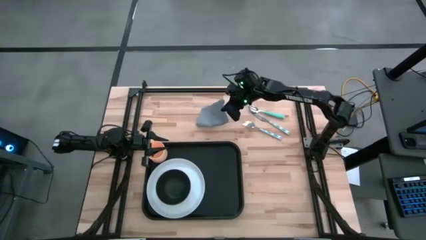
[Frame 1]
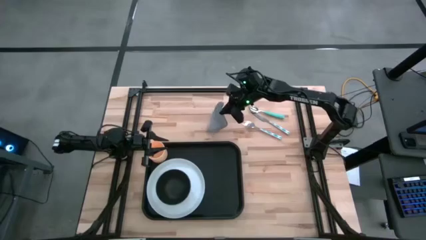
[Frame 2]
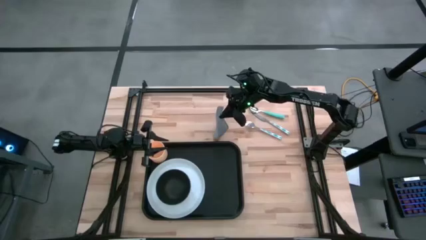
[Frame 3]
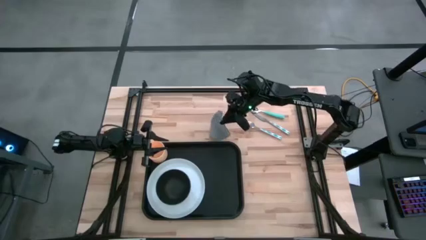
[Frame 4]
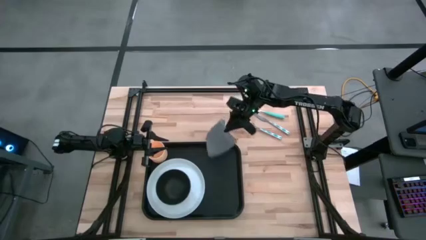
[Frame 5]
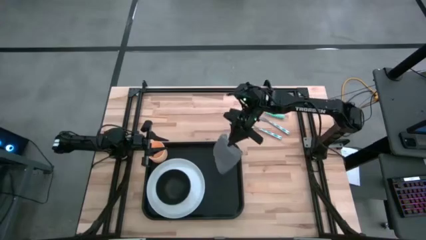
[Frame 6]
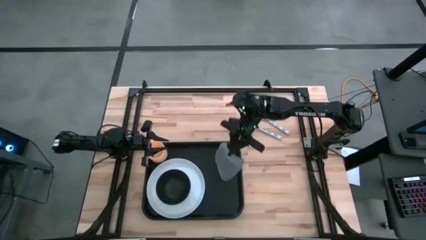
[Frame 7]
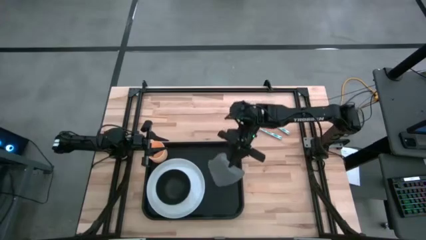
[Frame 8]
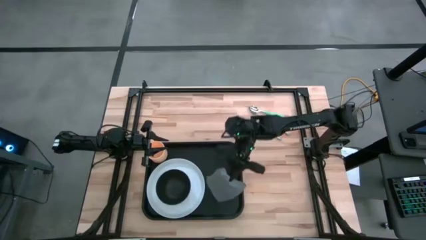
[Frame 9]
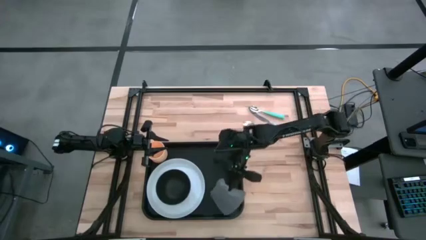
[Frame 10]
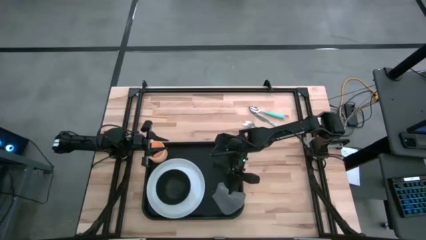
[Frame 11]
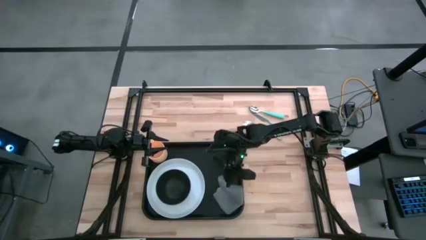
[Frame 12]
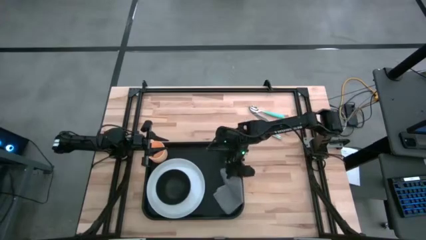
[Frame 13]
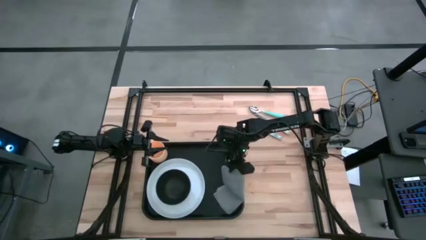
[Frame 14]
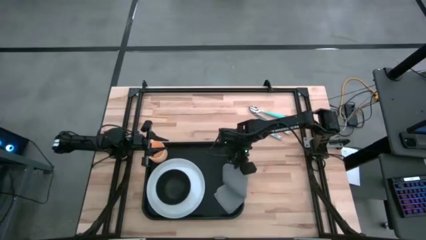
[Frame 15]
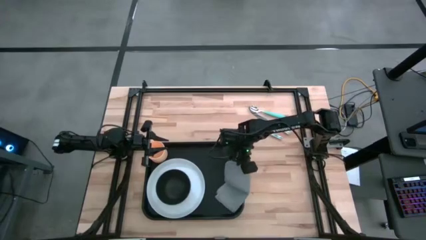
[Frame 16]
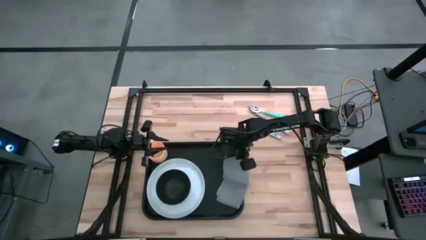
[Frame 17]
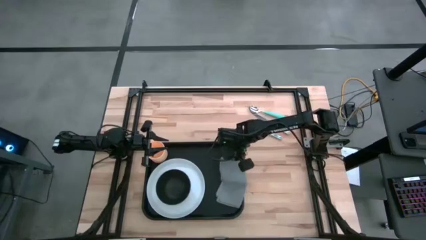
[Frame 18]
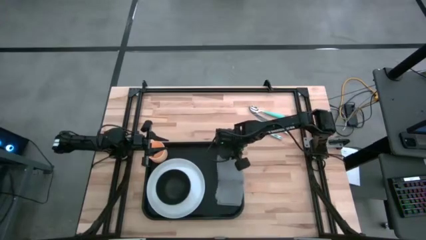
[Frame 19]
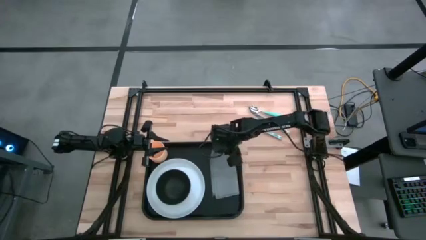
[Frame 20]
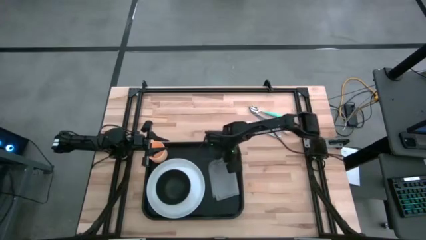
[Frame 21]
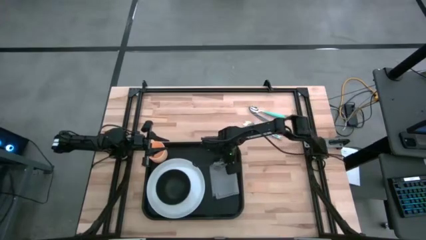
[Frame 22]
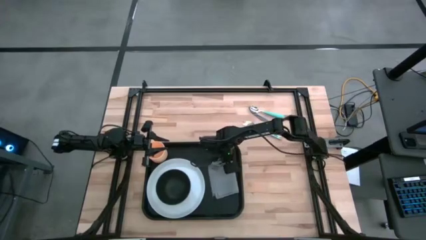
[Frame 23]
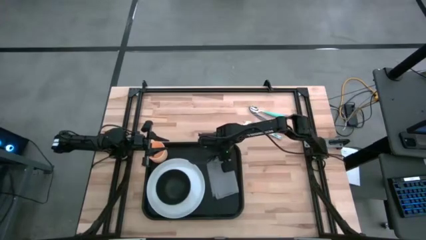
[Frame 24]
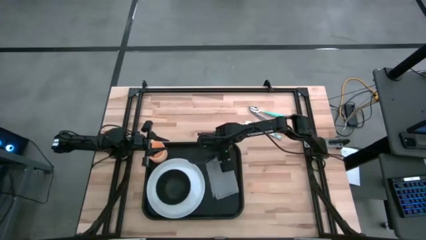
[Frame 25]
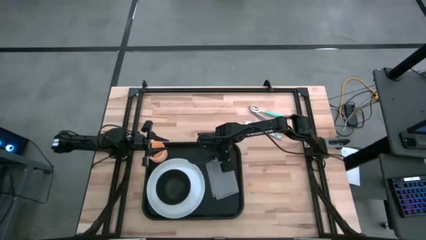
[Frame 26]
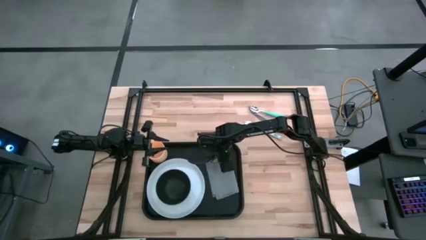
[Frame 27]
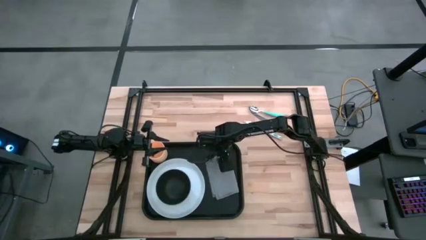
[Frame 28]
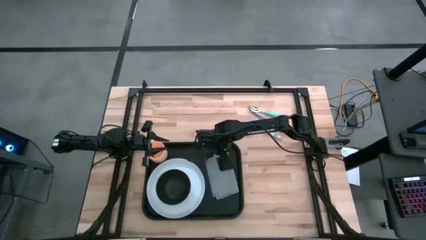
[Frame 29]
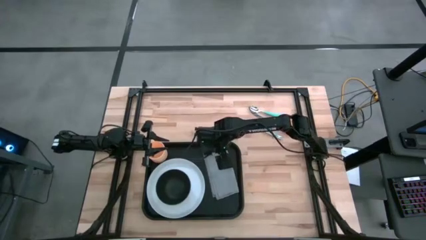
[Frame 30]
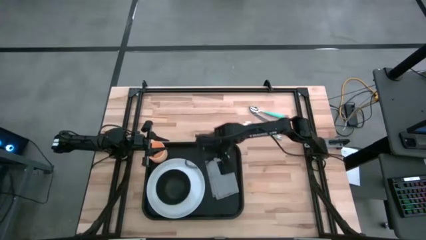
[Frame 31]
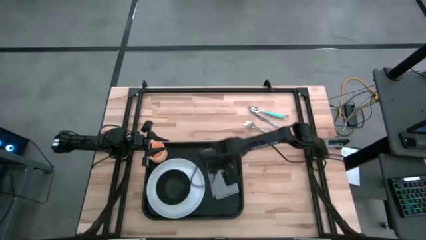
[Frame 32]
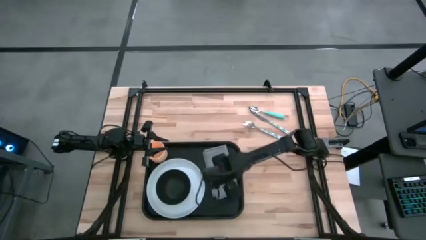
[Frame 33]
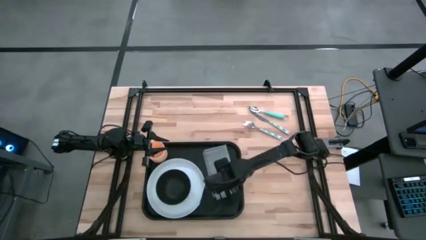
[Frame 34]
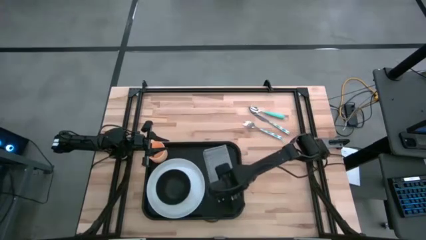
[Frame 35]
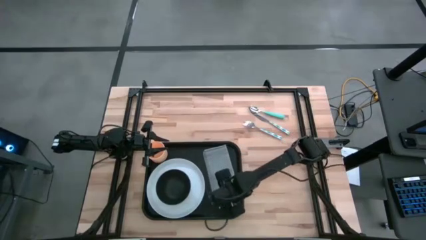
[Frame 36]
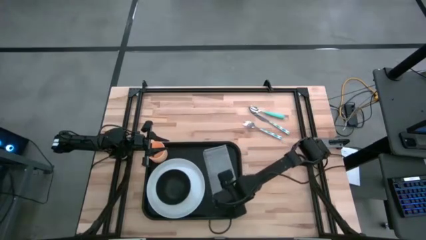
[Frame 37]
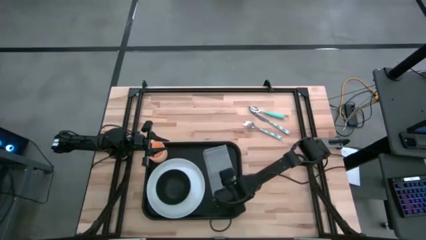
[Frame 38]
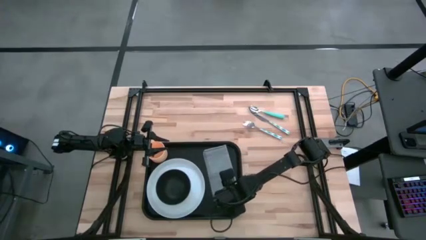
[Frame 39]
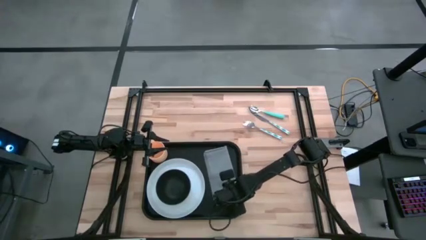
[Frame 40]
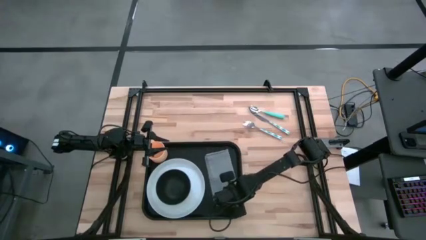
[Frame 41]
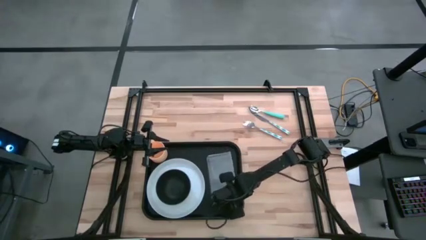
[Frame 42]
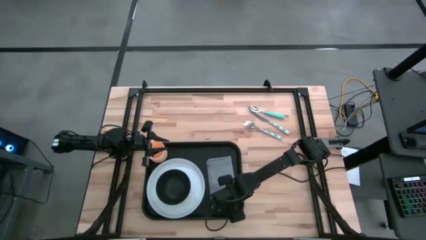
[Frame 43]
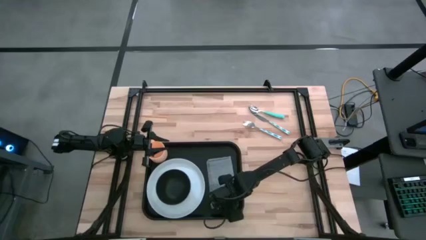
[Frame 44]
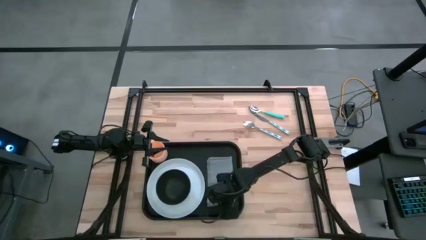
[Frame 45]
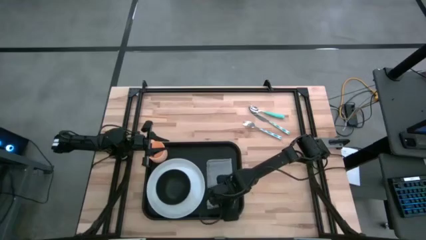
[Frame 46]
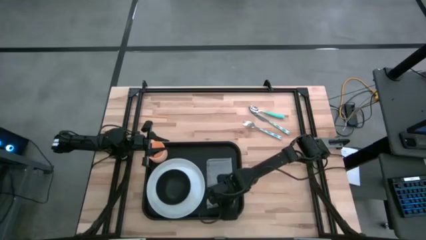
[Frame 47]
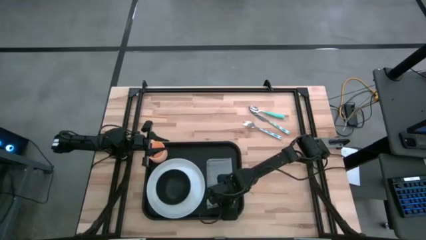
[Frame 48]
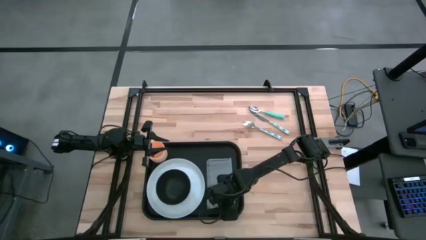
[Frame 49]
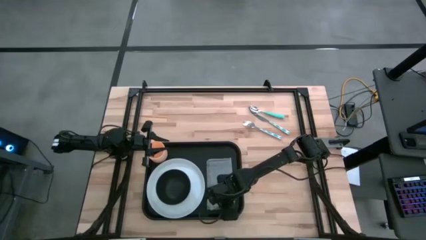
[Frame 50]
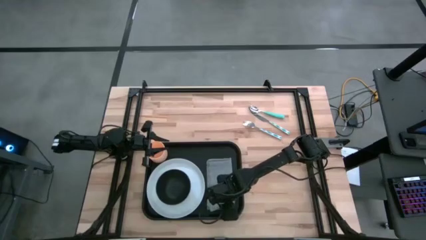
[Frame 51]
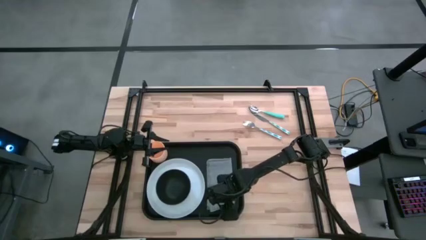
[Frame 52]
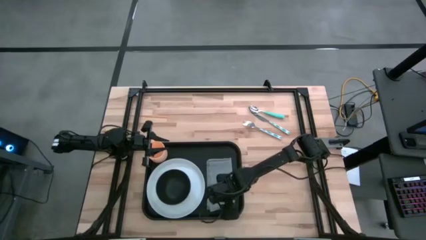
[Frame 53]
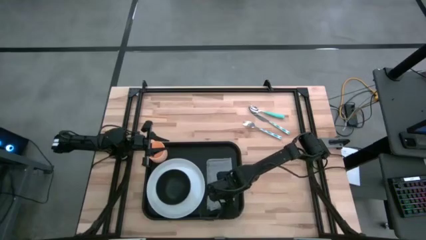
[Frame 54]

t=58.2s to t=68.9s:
Task: Set up tray
Put the gray napkin on the black tray to the right of the white plate
